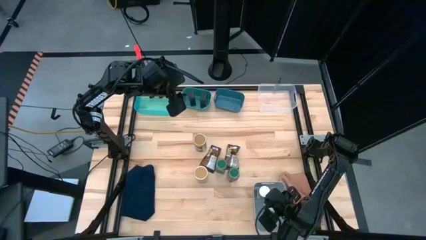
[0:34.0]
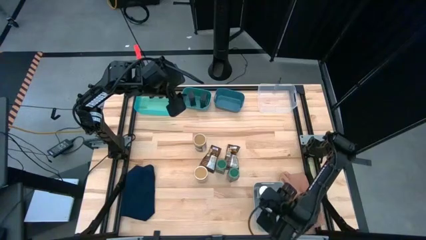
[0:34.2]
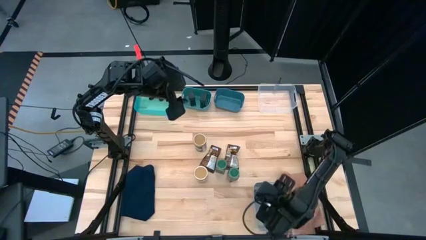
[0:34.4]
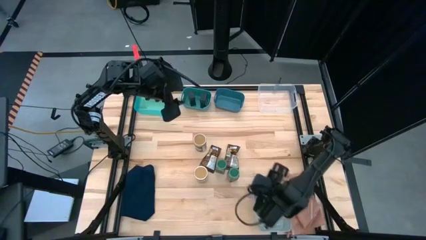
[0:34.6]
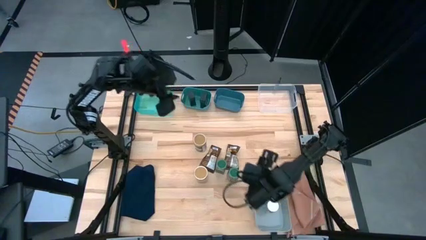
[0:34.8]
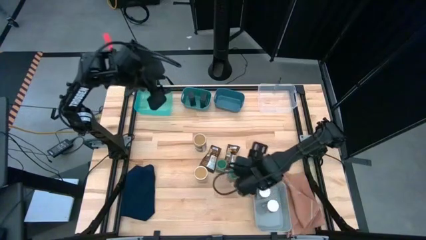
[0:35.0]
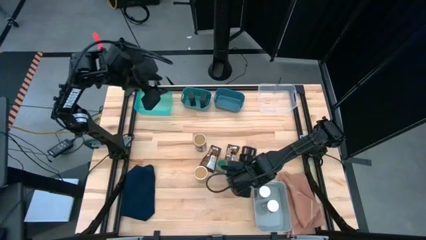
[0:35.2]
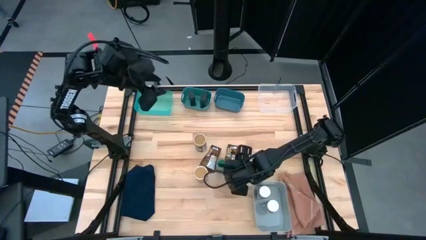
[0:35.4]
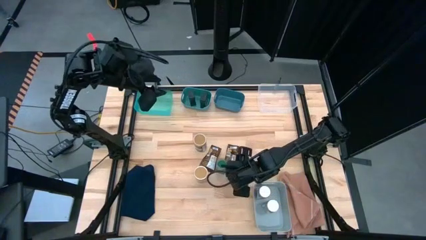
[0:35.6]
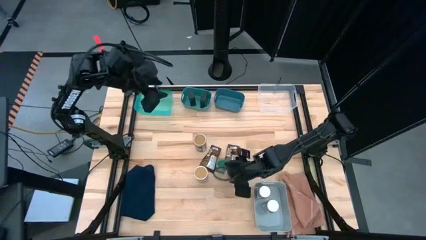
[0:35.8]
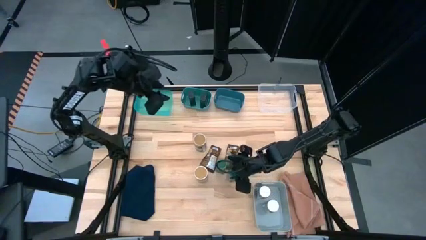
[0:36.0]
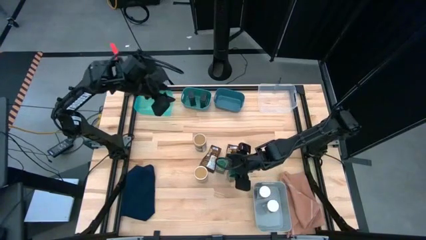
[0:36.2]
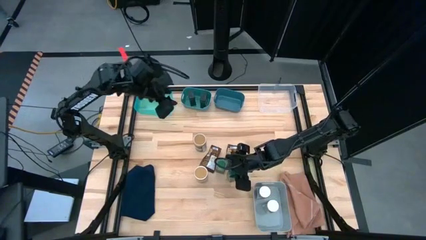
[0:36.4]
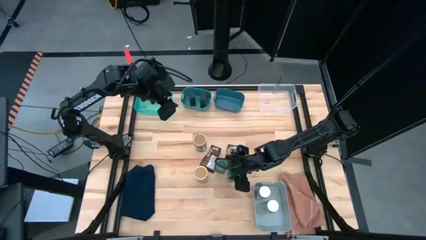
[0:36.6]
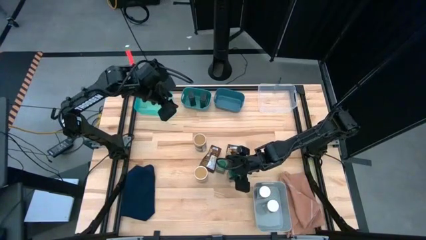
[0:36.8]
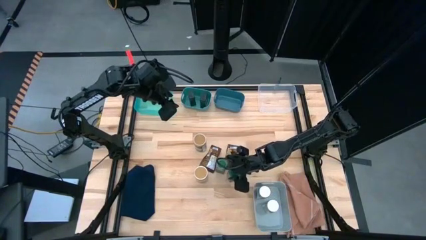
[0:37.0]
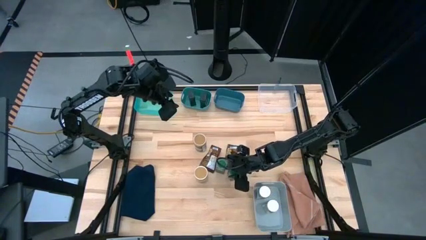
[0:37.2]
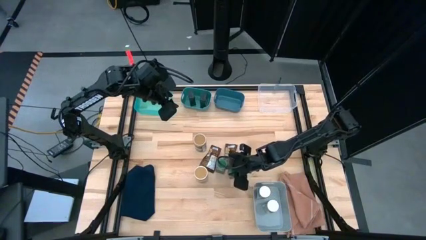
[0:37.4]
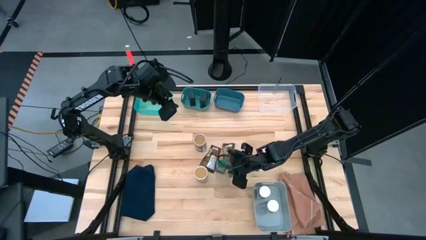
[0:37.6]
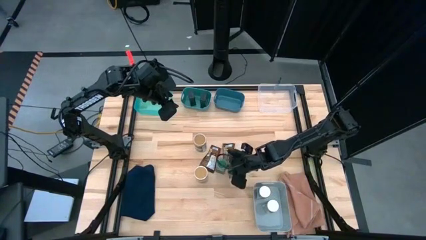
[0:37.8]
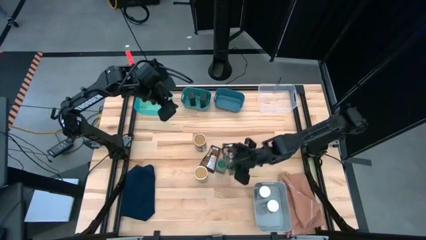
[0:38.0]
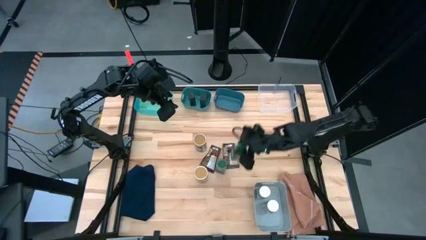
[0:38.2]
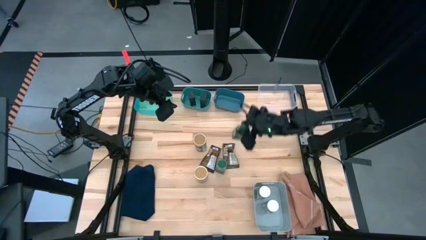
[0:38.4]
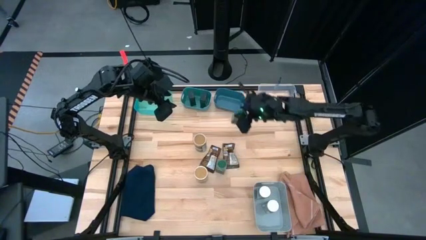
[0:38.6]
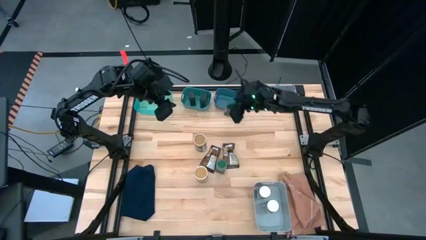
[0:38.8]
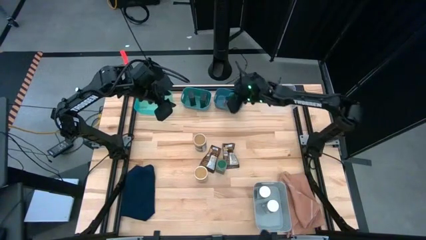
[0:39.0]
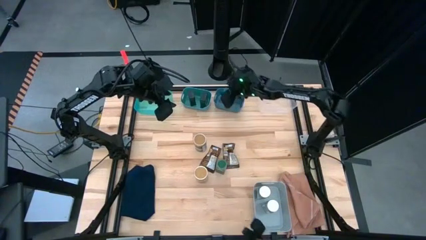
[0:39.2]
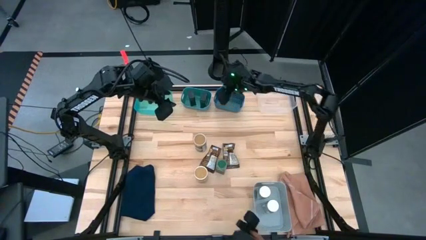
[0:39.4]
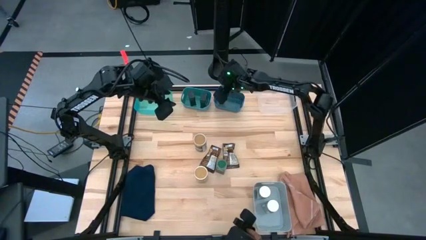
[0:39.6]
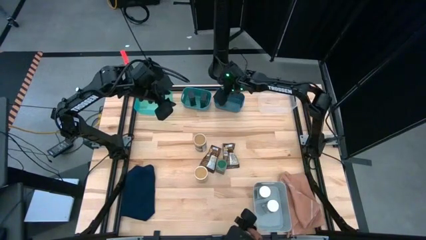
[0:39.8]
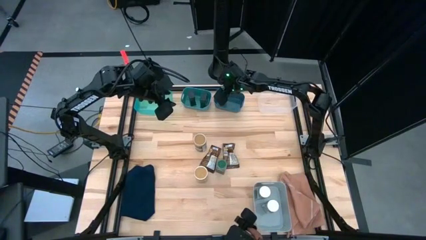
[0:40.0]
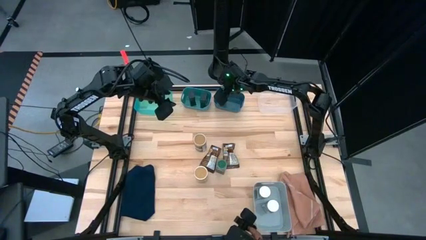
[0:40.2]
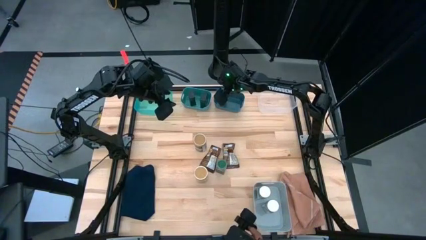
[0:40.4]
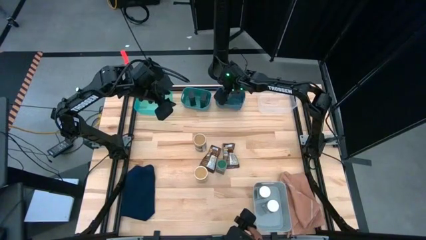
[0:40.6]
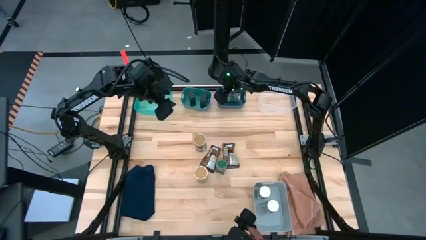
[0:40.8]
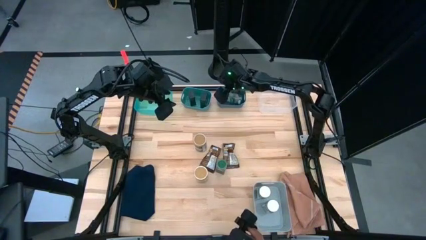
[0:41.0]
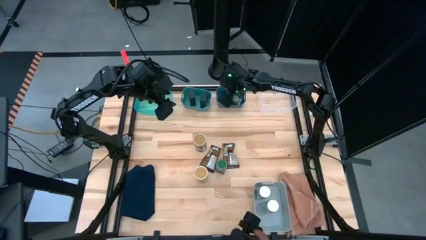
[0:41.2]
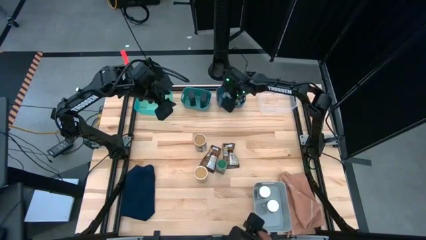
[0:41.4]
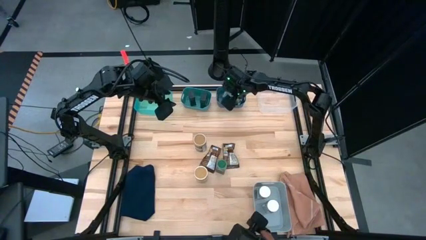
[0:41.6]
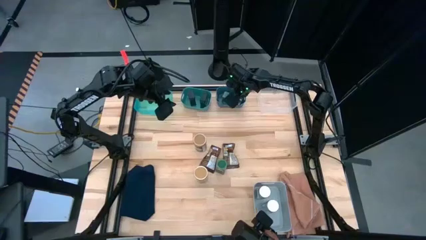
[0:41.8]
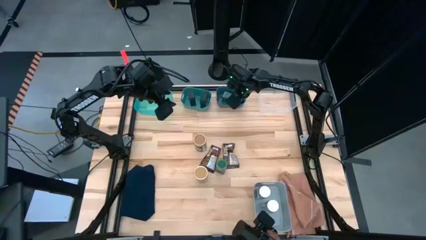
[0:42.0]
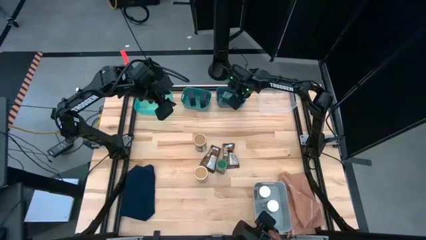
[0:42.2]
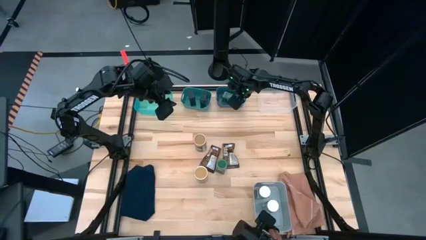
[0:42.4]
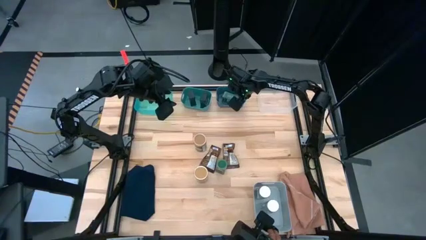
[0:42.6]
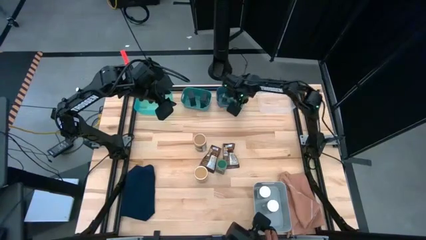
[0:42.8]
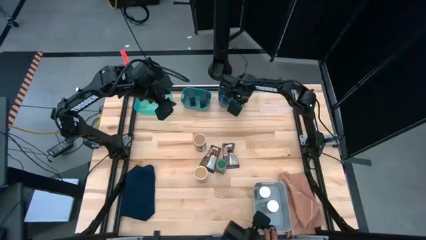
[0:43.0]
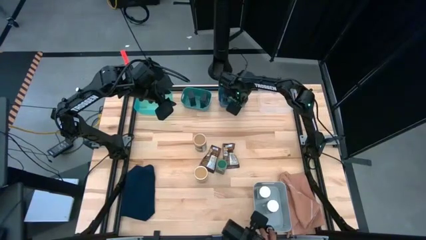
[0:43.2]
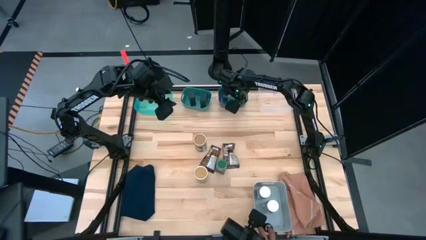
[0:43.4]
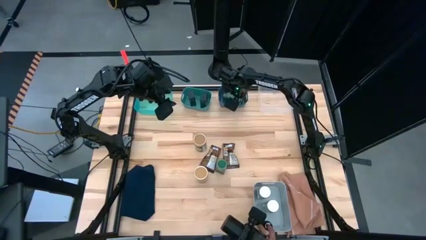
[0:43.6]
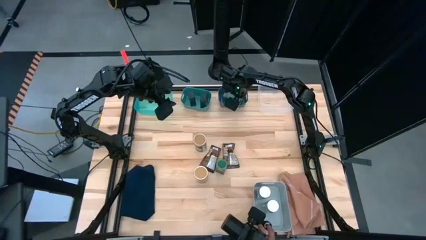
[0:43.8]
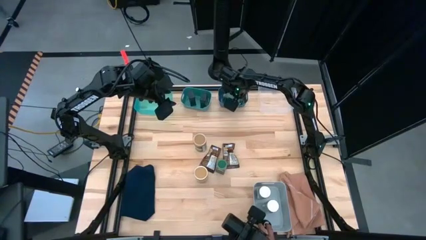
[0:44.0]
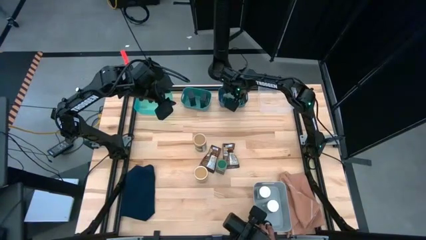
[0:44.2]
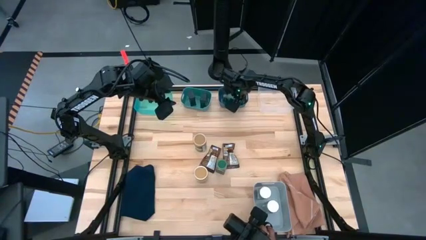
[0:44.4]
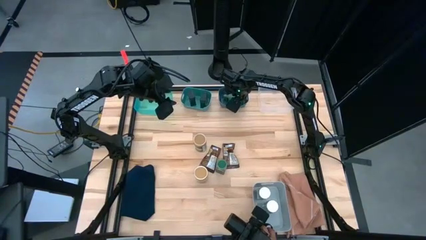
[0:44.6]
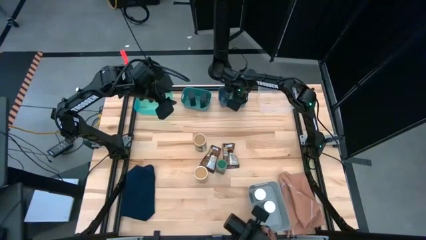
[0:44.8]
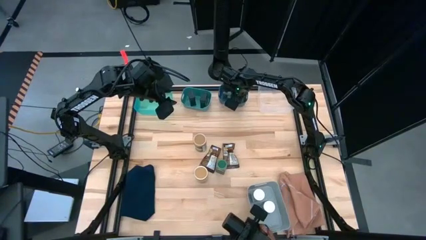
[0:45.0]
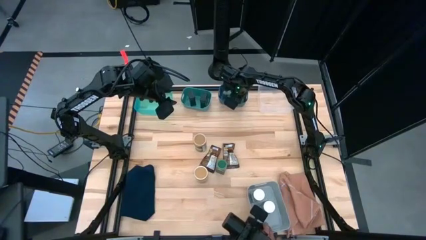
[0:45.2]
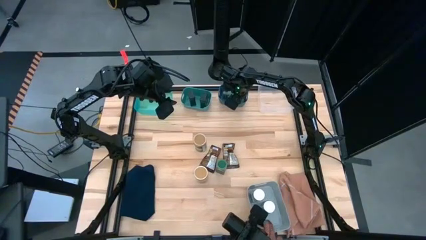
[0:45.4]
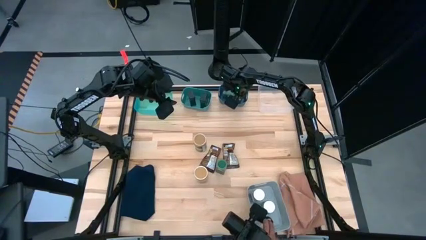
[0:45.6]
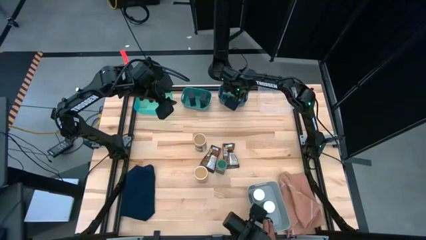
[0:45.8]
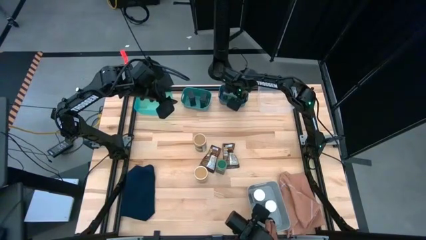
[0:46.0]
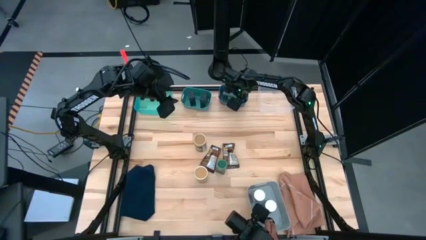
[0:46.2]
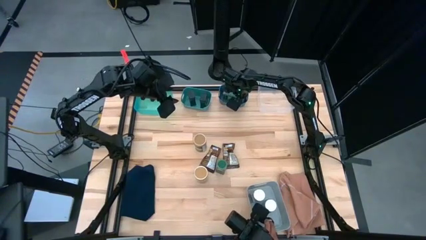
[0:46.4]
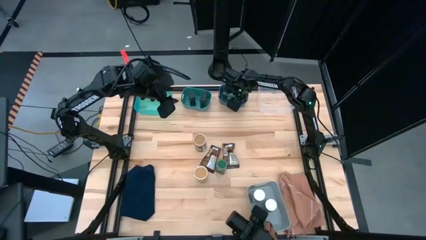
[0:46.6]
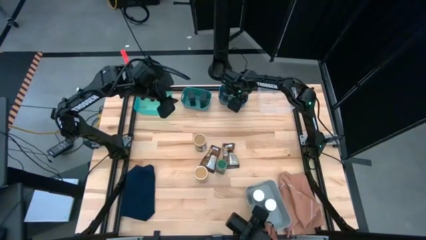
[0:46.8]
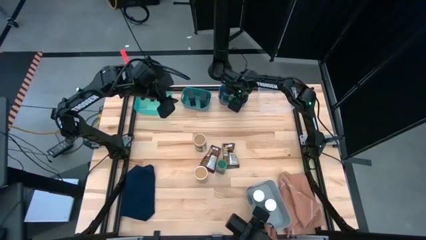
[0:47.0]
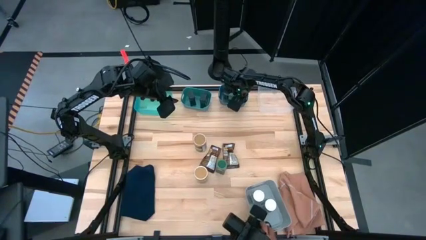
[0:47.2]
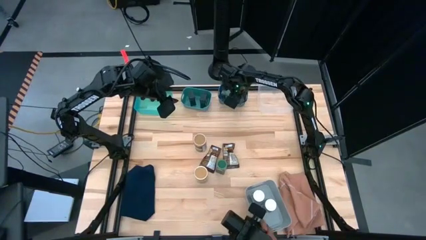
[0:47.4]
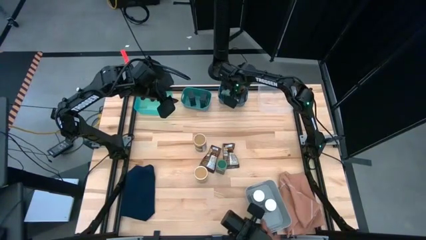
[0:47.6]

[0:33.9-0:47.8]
Task: Sort spices by type
Put the right green seasoning bottle into the blue bin

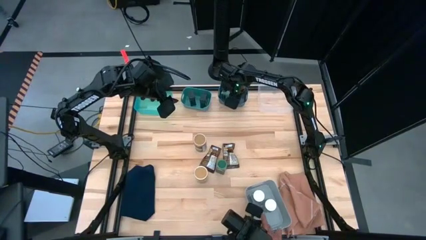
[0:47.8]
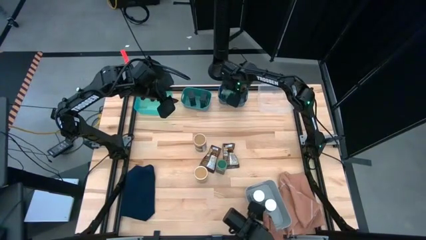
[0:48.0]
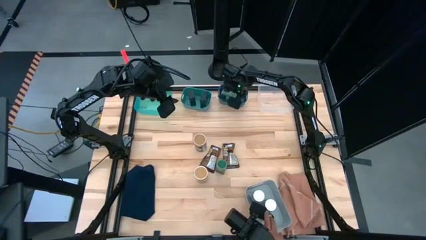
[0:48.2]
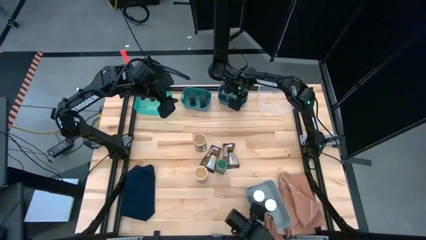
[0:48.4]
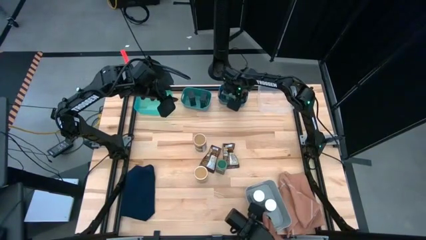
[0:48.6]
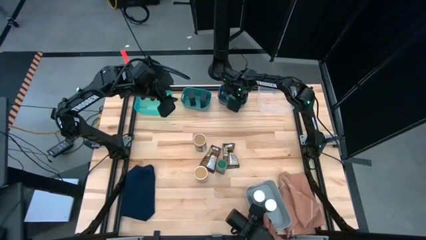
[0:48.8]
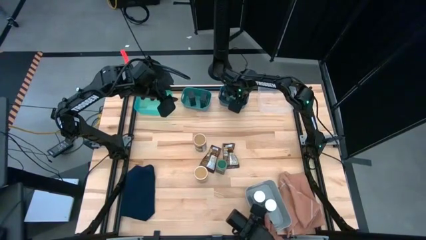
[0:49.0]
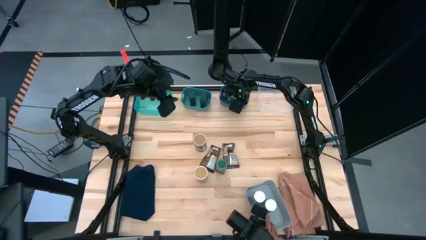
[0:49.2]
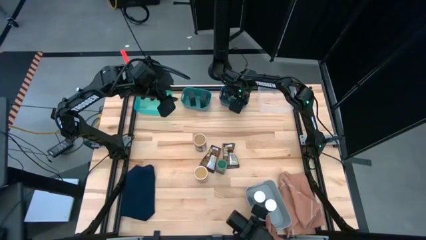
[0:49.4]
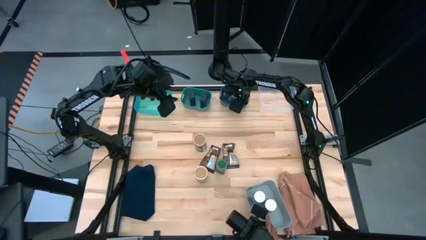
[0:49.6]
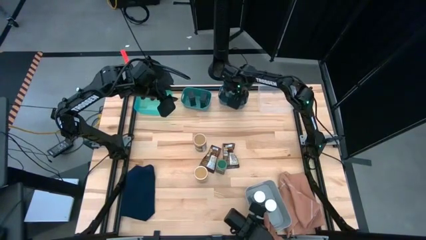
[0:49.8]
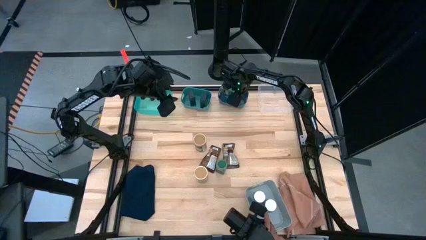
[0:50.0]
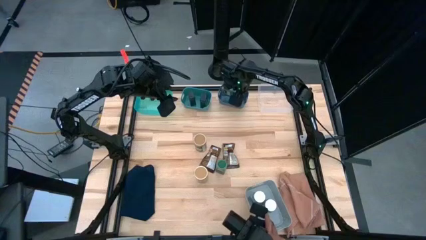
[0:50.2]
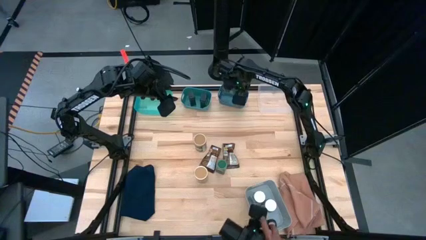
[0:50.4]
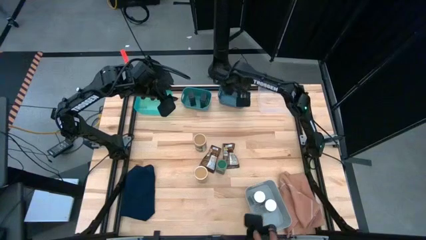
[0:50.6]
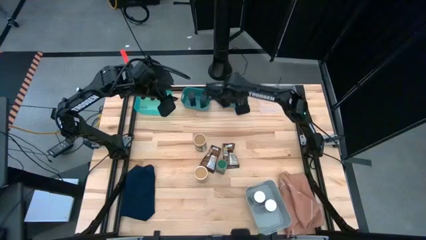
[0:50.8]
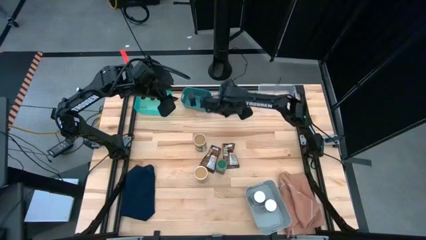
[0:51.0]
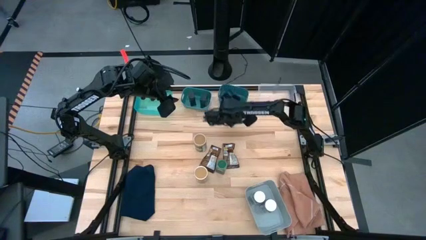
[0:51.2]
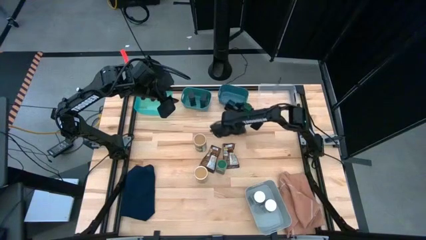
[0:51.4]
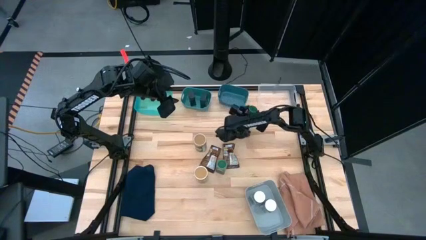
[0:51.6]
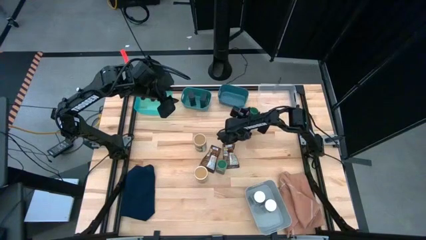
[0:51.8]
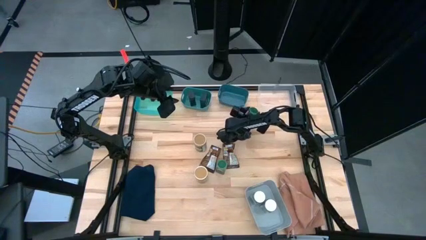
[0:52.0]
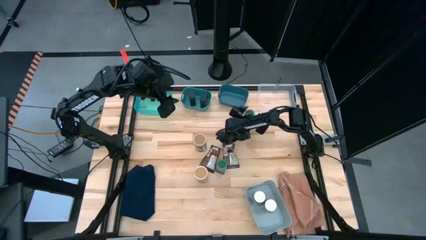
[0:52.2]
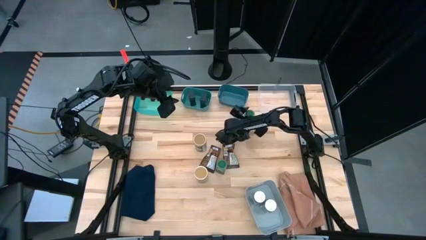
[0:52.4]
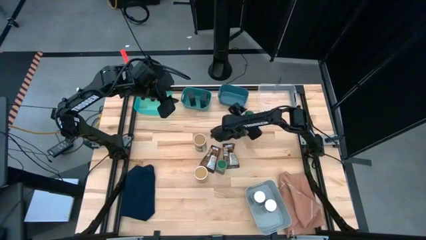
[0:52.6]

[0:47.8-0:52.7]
Remove the green seasoning bottle from the blue bin
